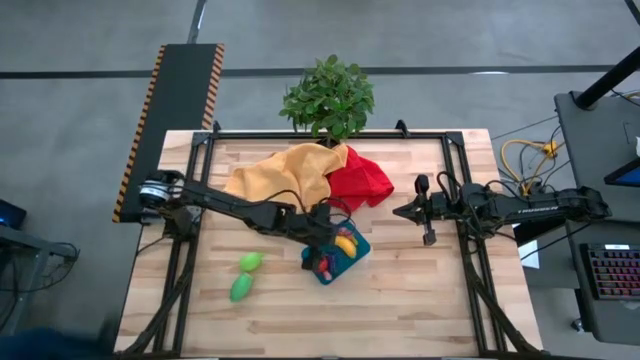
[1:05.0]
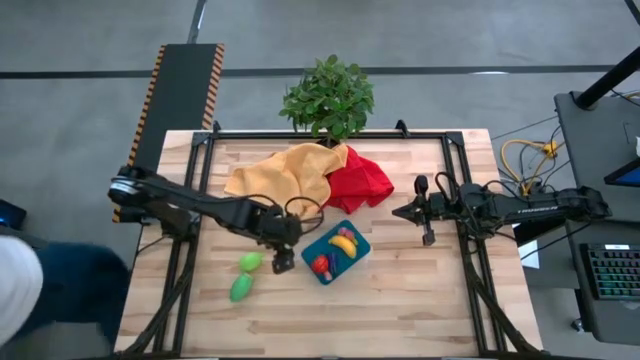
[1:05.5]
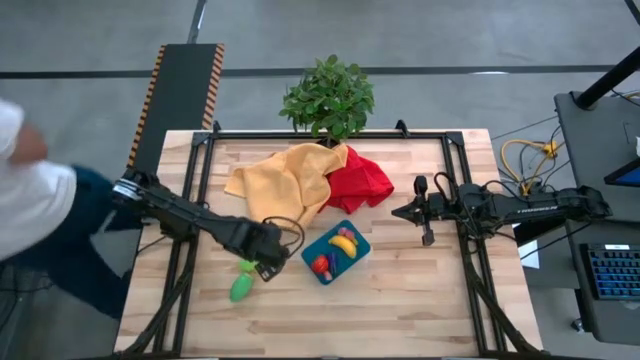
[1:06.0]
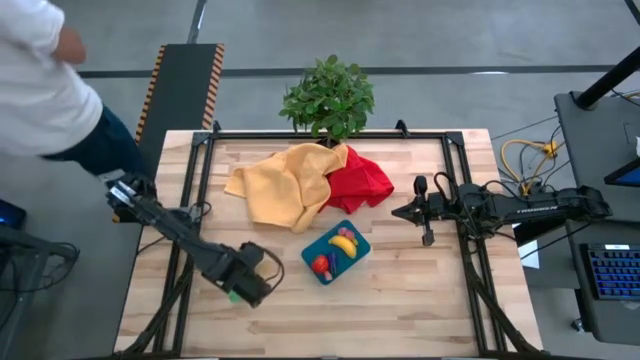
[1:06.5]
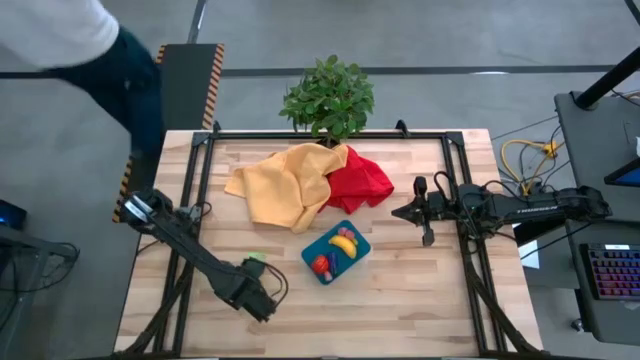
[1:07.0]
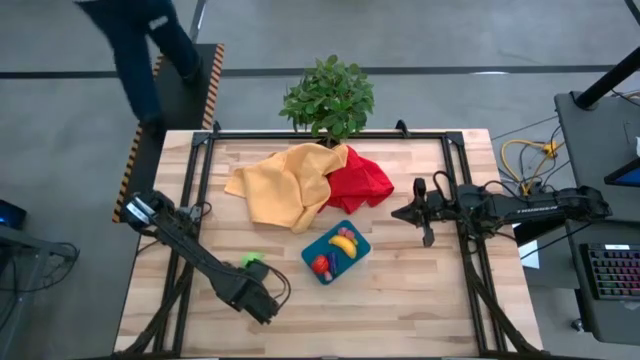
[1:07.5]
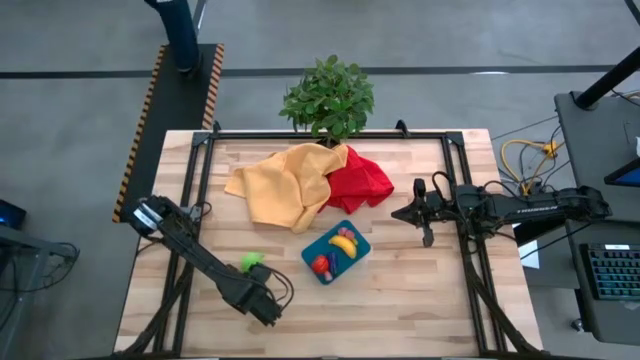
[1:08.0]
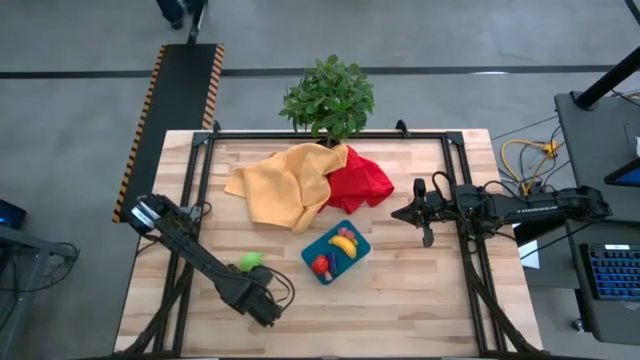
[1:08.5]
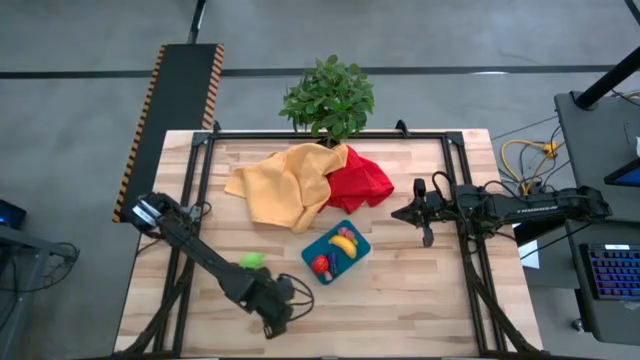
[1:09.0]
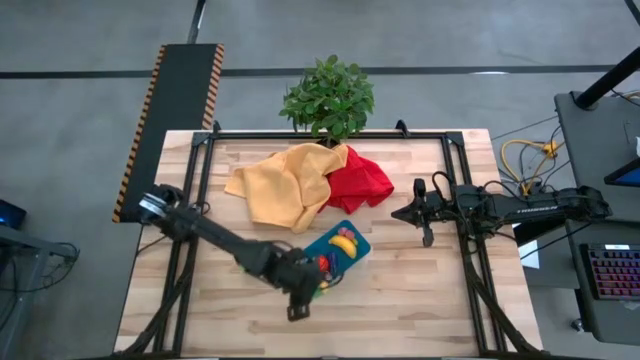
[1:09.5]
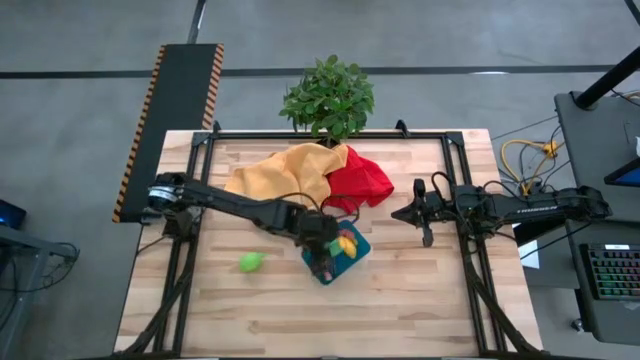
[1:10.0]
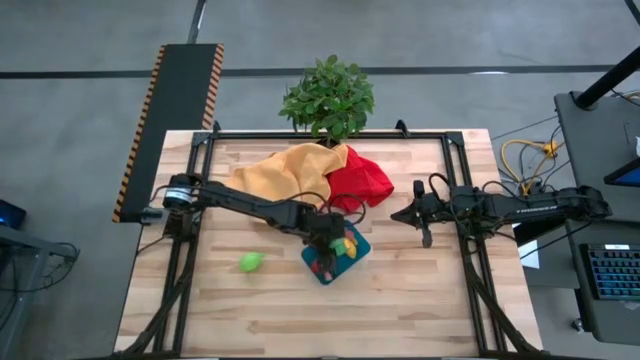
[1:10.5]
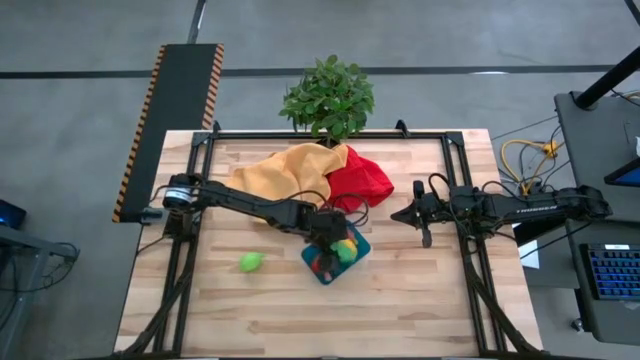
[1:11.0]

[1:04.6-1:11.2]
Task: Pick and placing Produce into tupperware
Put the green corn into the blue bin

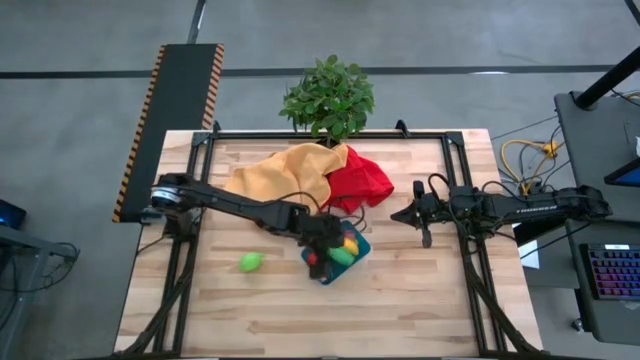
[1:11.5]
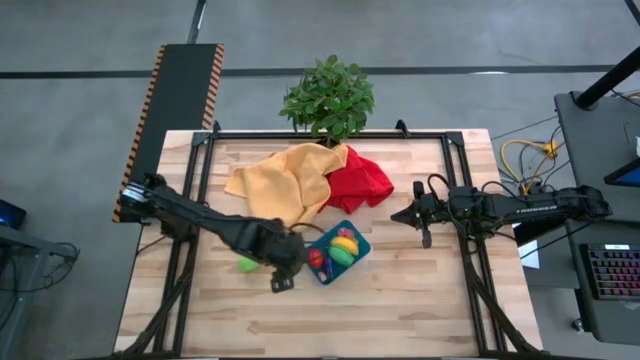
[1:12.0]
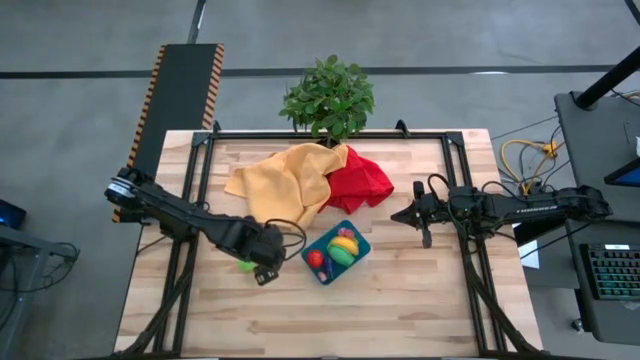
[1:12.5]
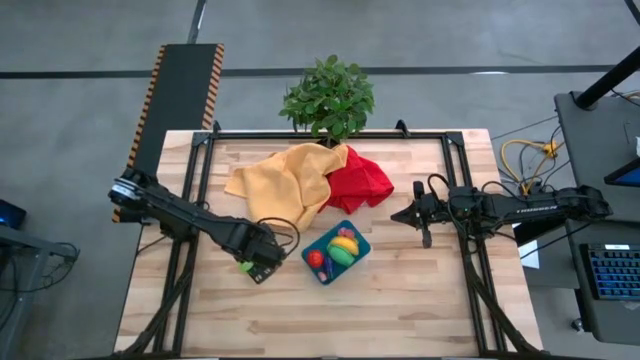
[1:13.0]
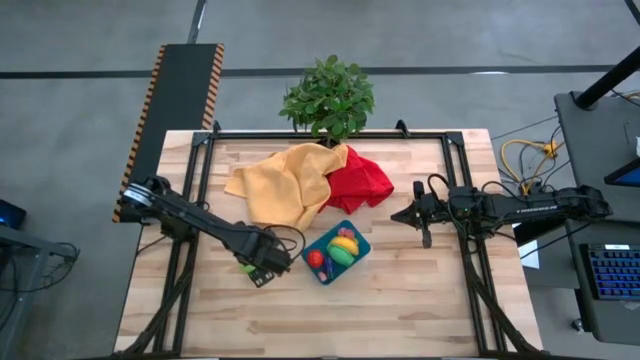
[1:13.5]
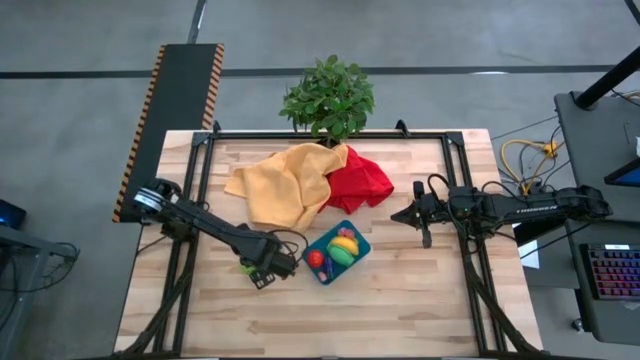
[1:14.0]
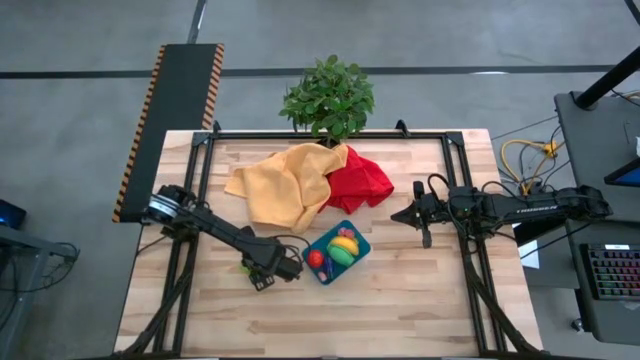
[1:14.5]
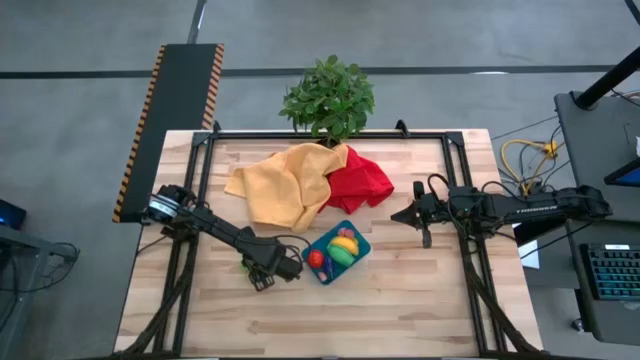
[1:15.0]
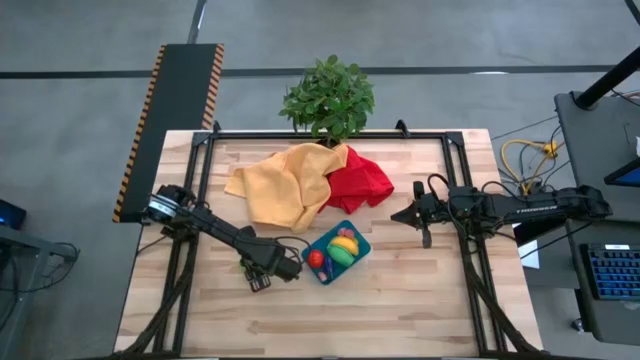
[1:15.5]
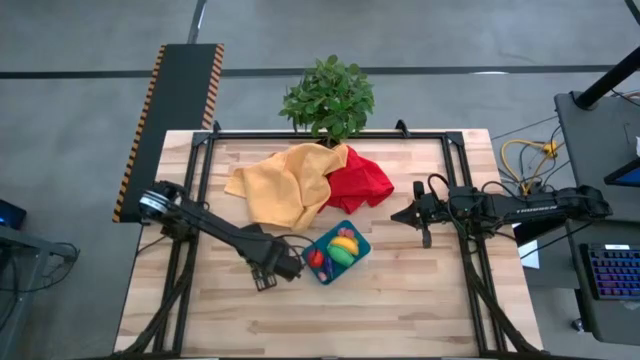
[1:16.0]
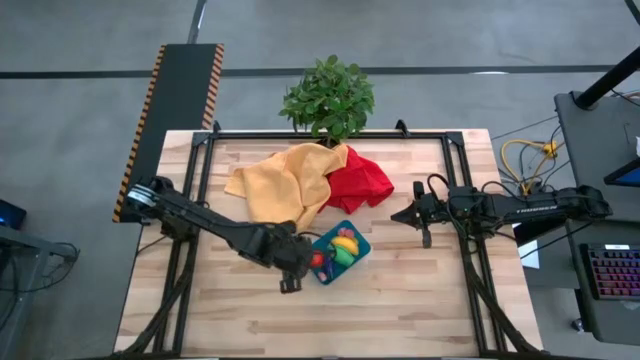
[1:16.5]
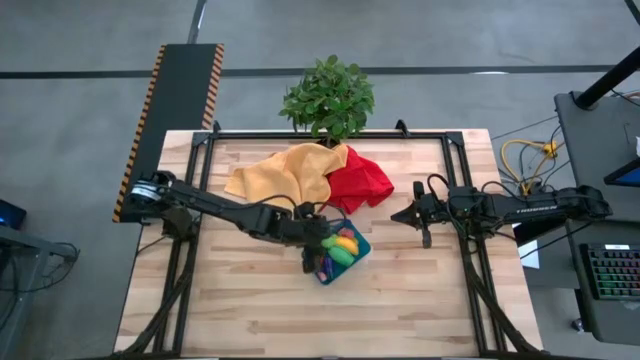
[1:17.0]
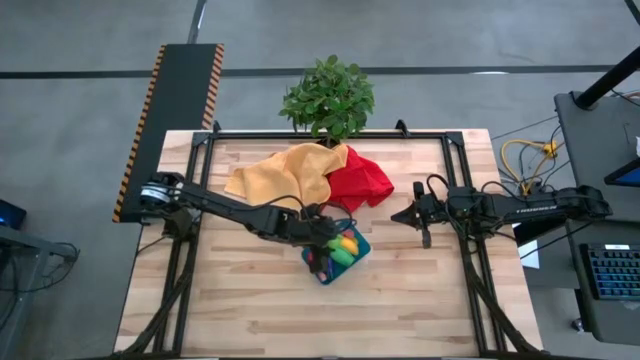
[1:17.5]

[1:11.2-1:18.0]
Put the green melon into the blue bin

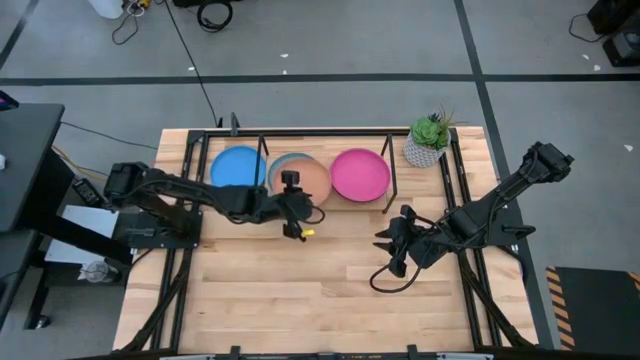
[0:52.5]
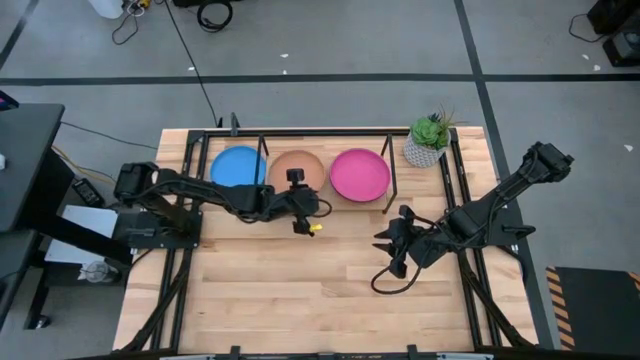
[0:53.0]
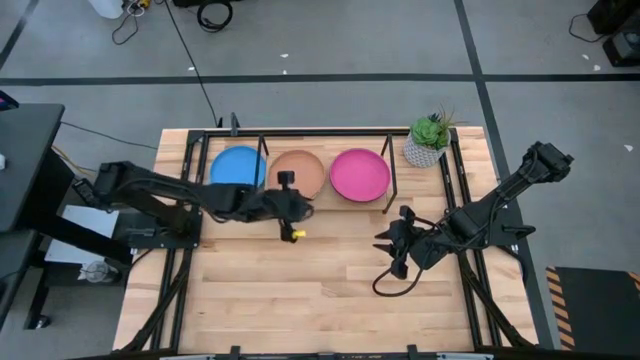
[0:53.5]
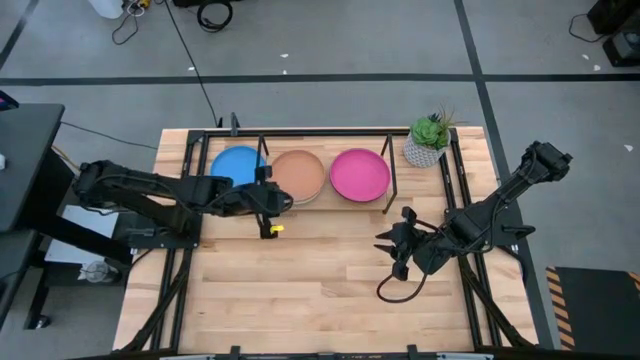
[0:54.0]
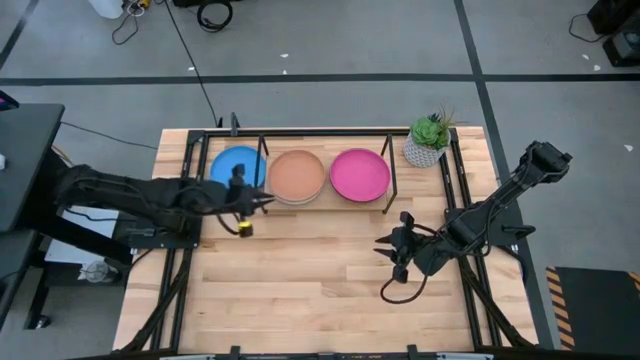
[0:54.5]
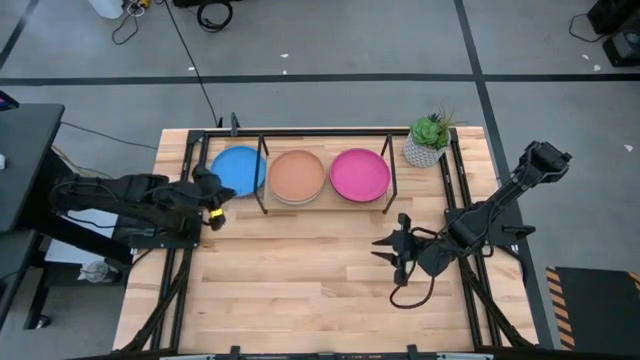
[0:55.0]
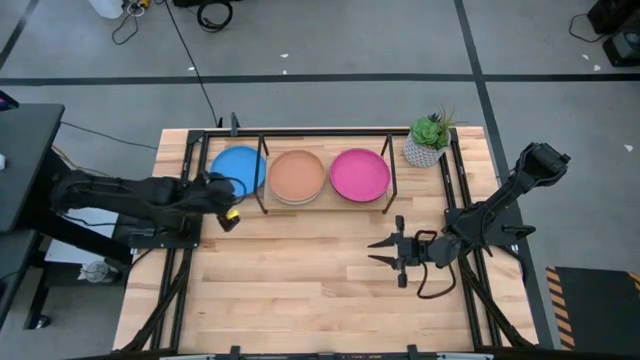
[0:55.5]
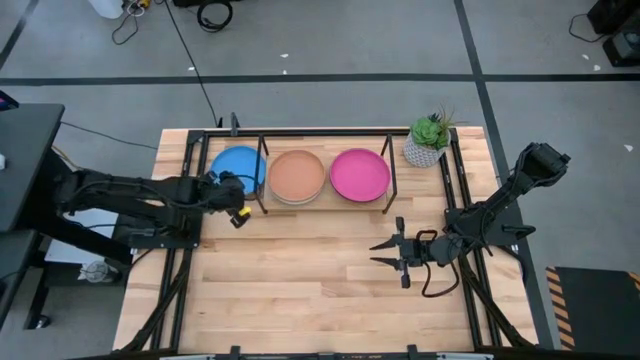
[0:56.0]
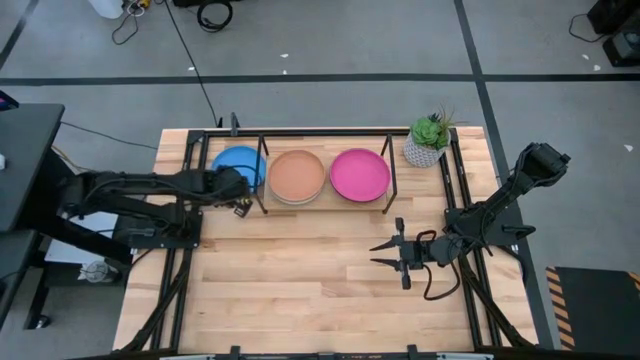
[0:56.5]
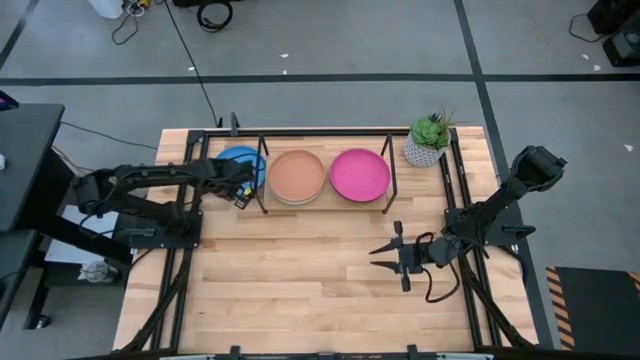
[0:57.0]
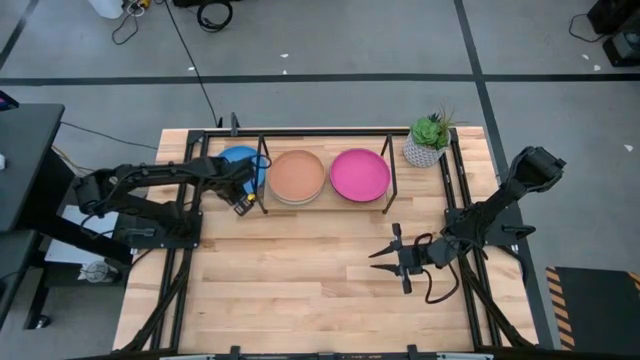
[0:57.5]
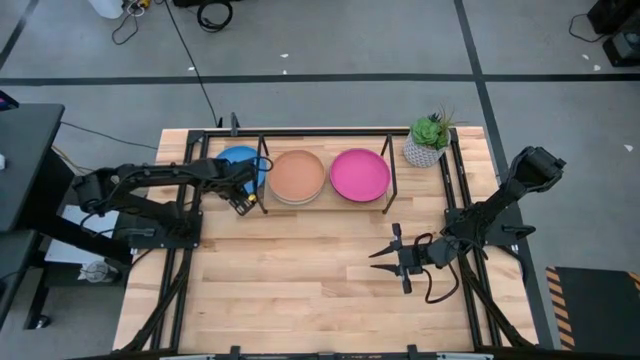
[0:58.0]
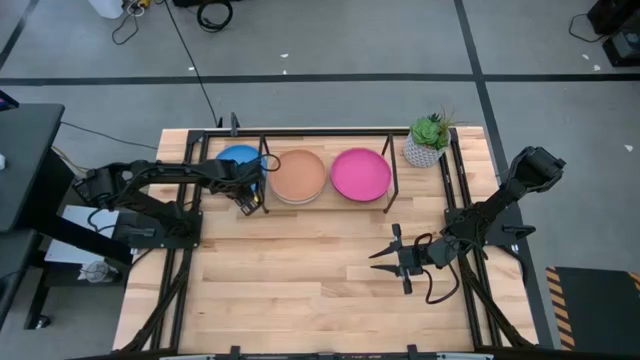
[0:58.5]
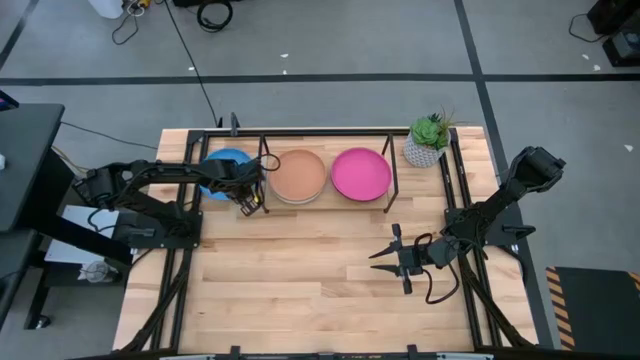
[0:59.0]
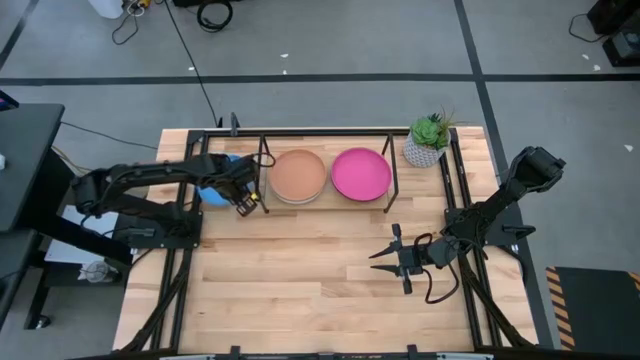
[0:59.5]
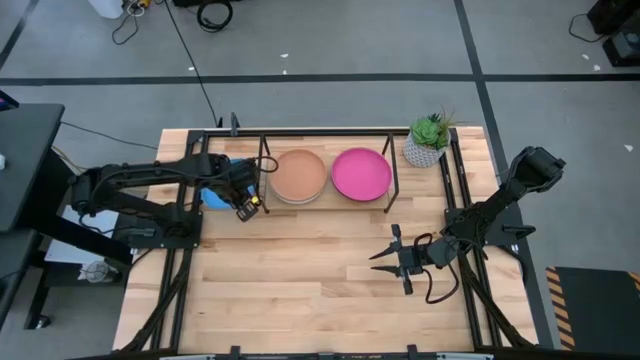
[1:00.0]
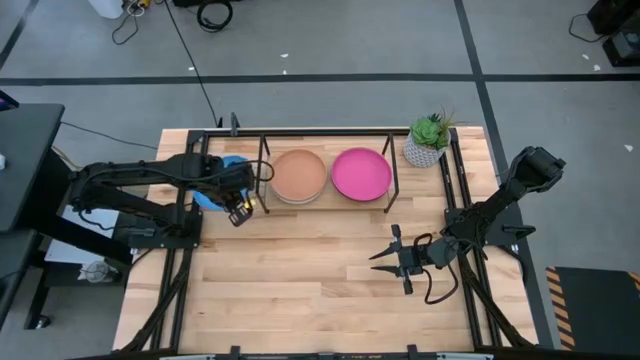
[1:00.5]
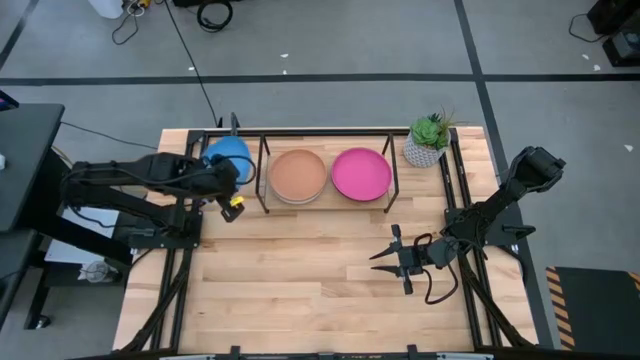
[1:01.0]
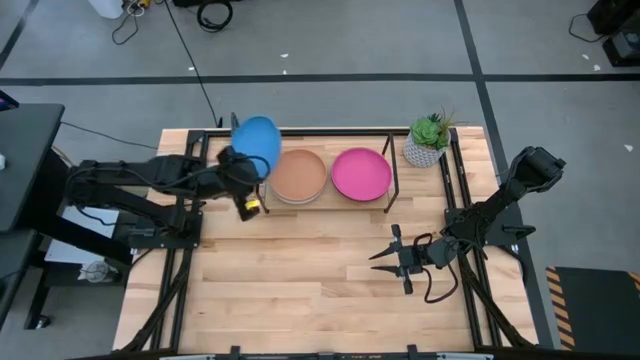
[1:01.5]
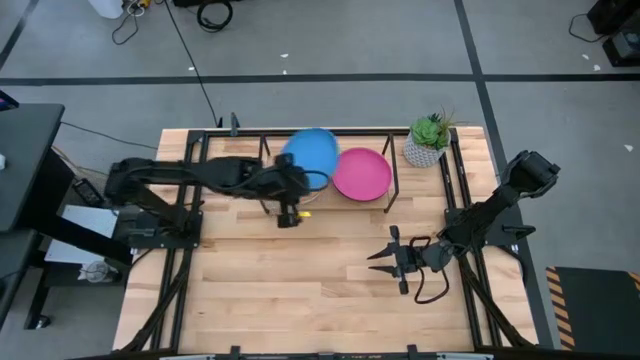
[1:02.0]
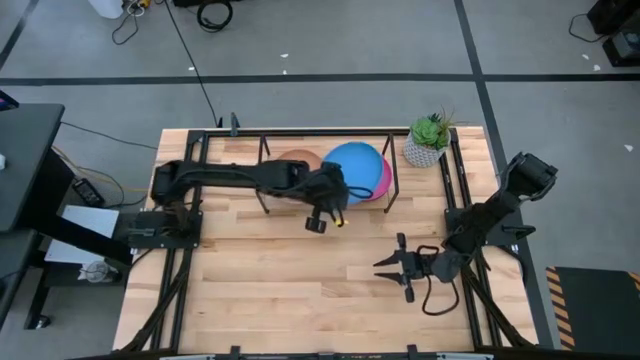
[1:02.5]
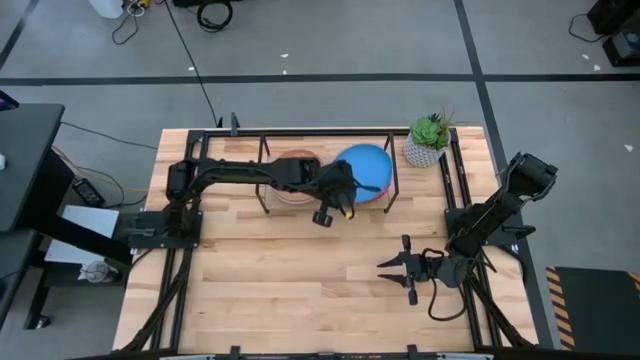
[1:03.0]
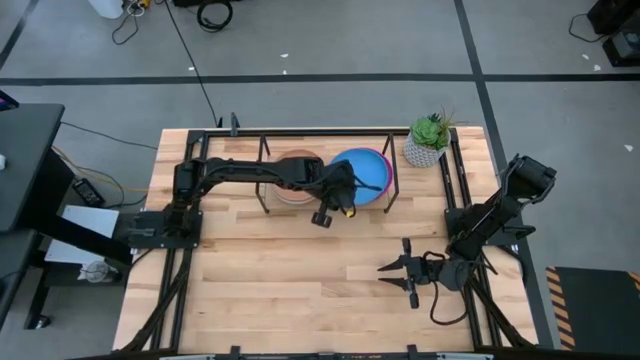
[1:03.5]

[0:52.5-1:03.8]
Task: Place and stack plates onto a shelf
Stack the blue plate on top of the pink plate on the shelf
